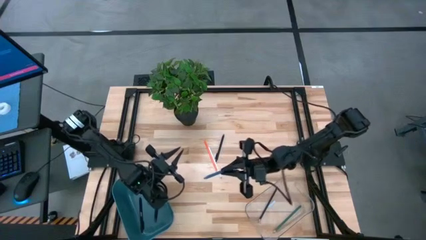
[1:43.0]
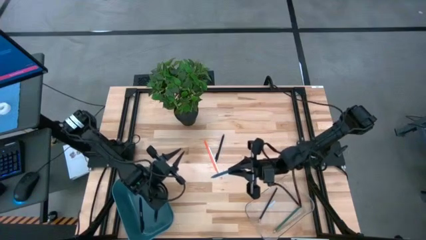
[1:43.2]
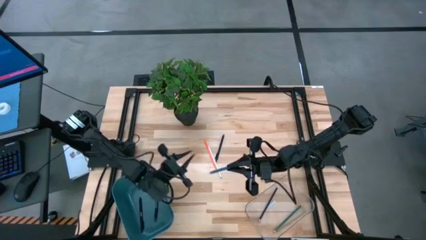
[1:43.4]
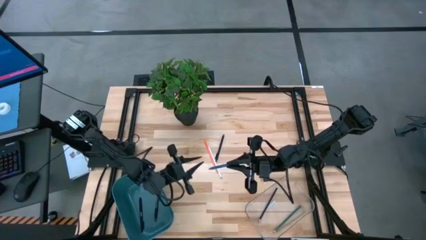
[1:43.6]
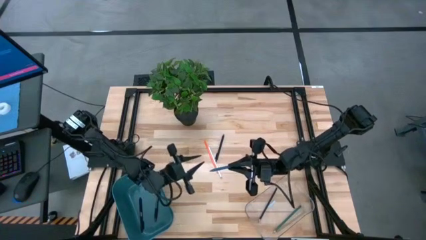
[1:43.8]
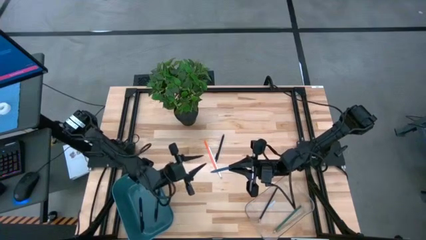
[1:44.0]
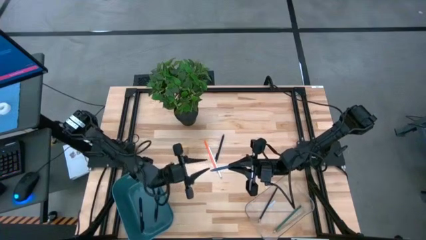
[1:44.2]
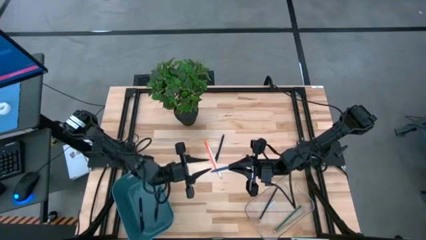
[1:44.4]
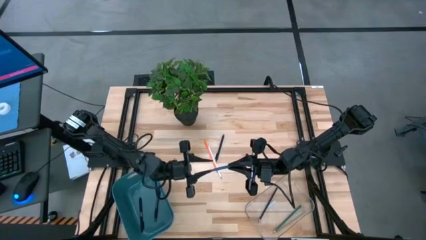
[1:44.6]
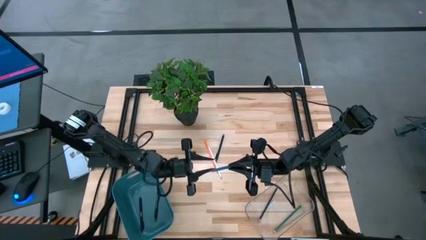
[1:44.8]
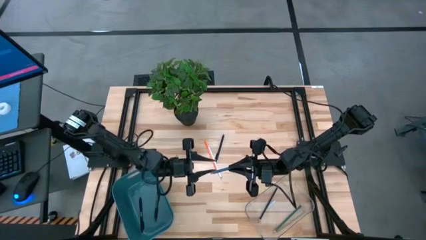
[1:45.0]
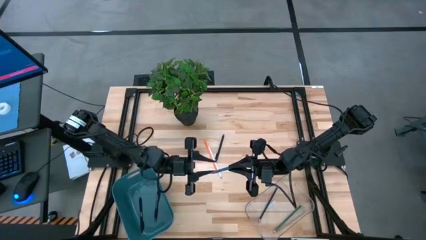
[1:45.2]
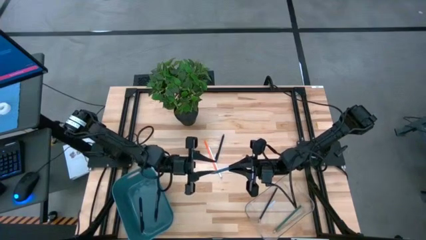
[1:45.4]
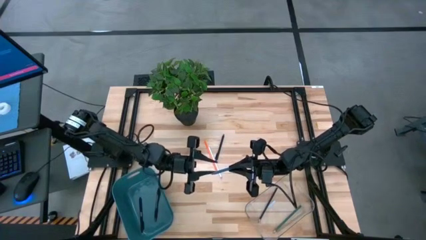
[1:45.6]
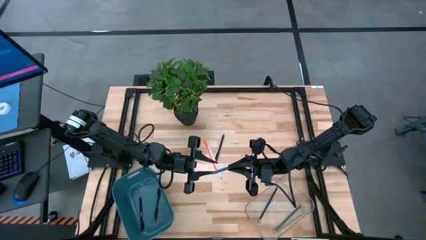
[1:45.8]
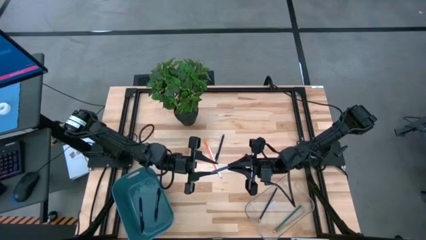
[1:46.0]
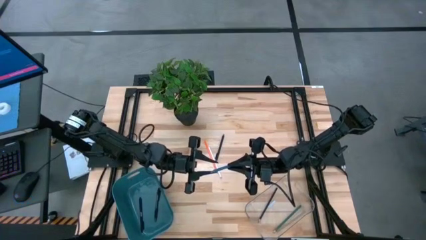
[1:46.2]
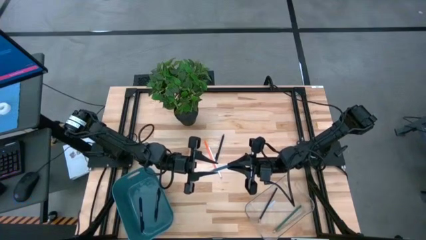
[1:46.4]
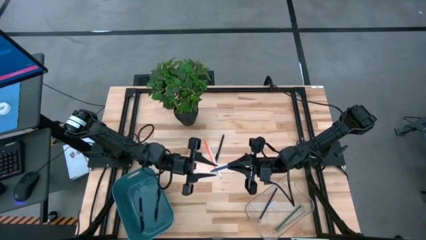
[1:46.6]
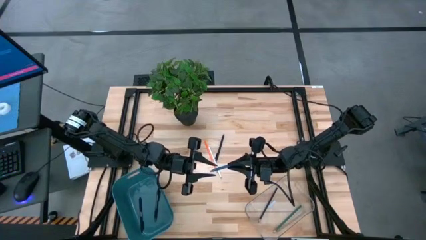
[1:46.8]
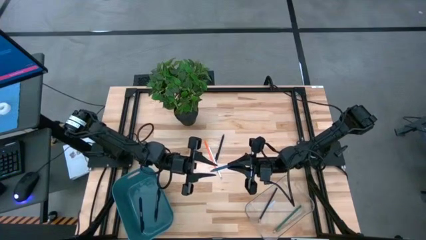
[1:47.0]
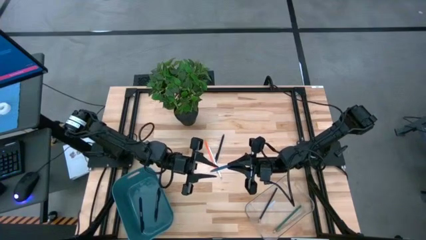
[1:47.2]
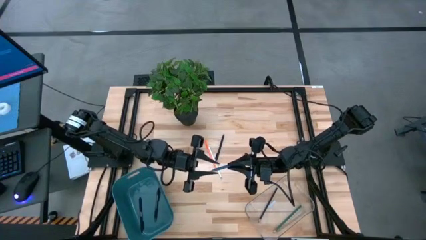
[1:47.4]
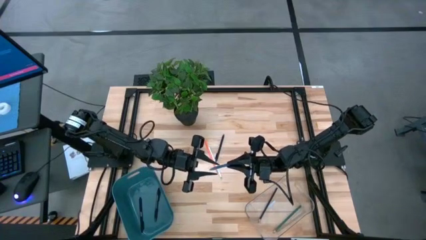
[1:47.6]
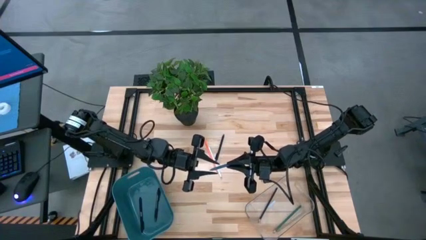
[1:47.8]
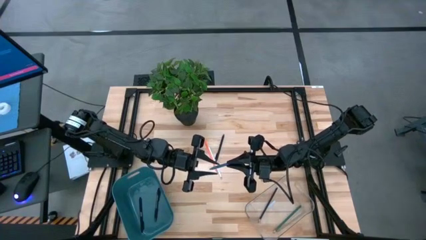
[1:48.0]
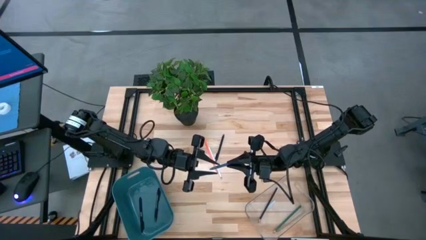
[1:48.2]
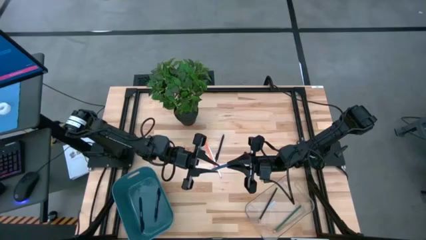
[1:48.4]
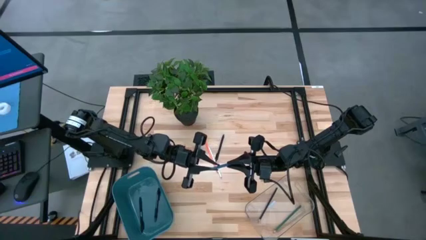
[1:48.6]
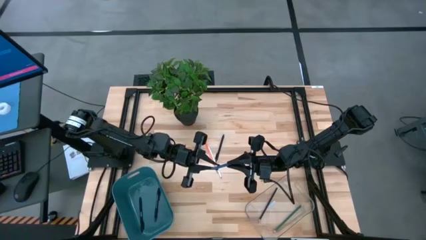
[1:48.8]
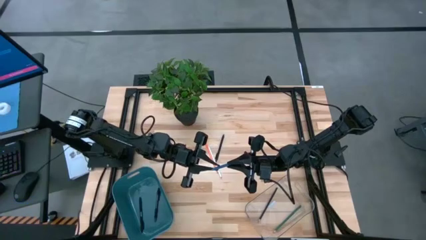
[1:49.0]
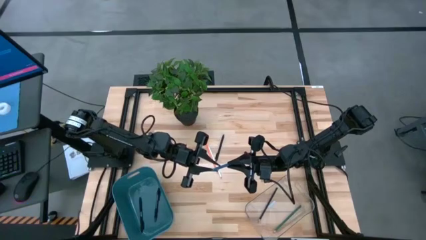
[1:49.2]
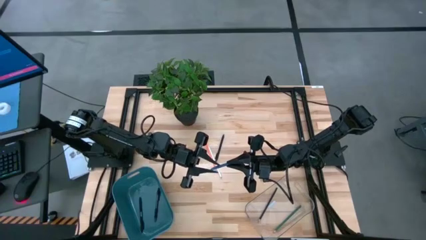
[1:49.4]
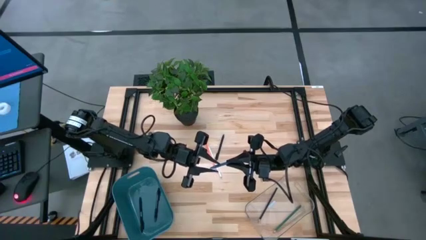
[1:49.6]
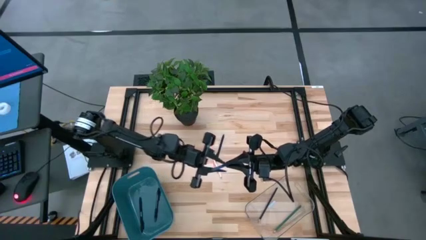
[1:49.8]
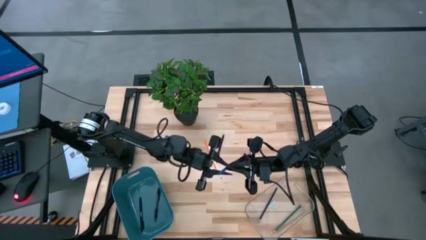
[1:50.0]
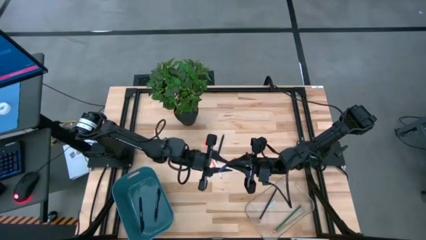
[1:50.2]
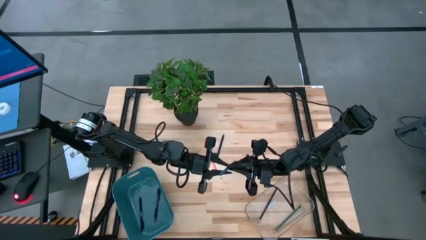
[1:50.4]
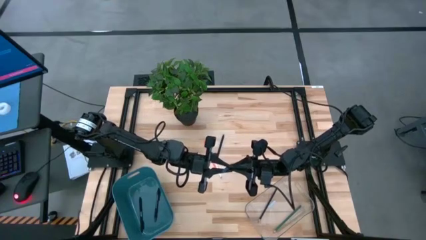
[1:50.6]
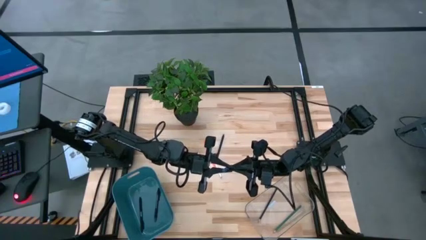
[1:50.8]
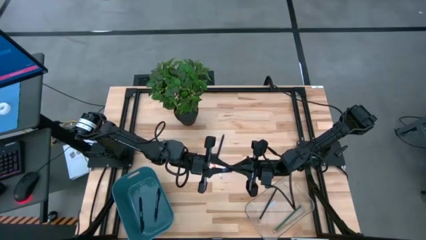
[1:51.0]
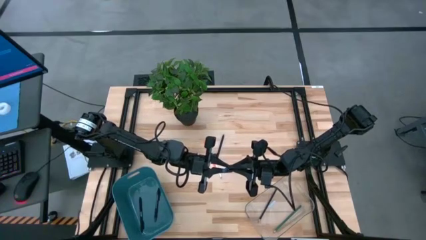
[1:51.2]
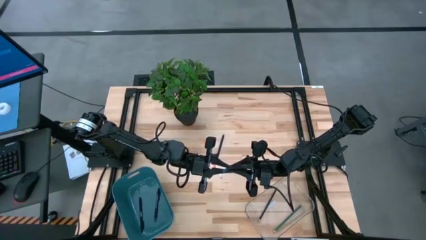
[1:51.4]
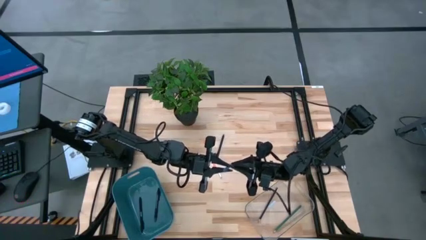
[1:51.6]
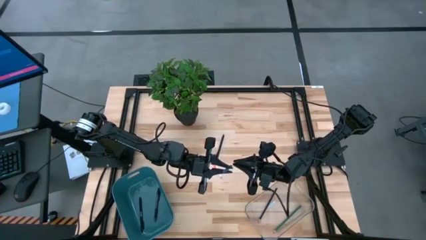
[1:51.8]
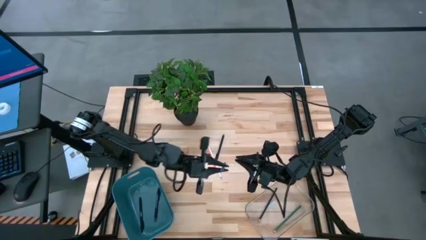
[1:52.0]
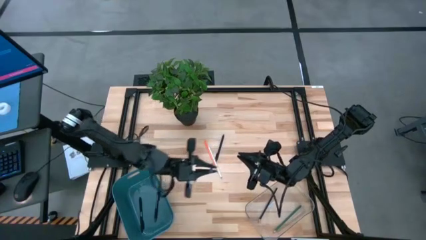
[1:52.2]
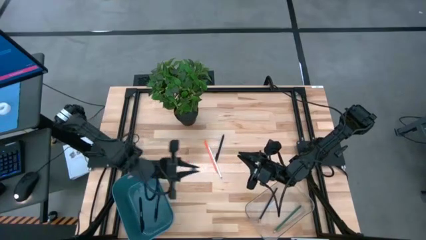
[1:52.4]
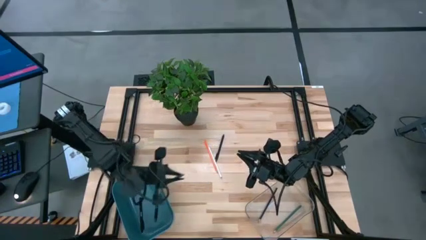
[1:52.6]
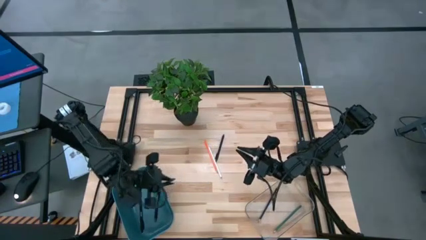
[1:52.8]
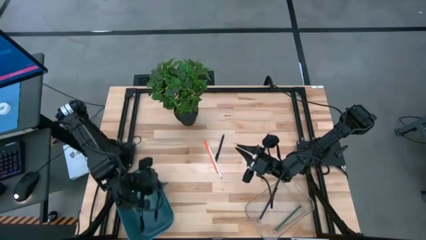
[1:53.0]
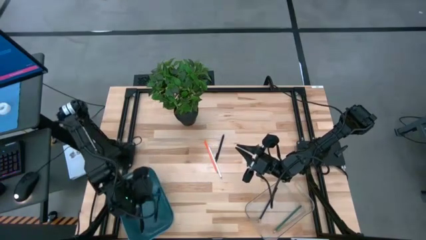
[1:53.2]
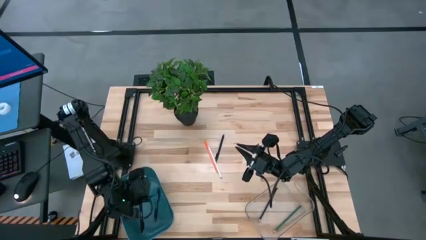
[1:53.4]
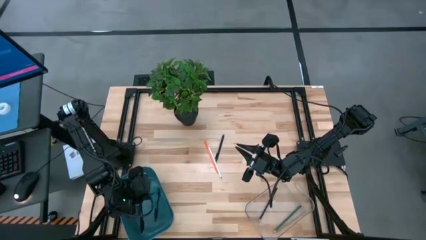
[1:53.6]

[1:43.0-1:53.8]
Task: Sort pens & pencils
Put the blue pen into the blue bin

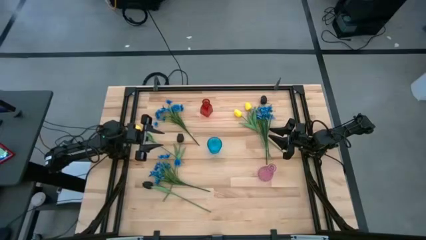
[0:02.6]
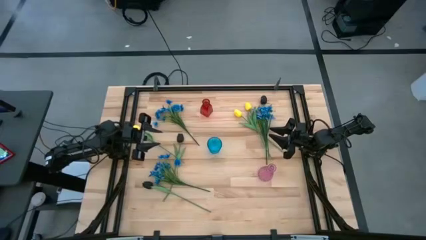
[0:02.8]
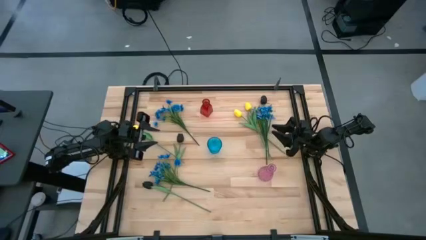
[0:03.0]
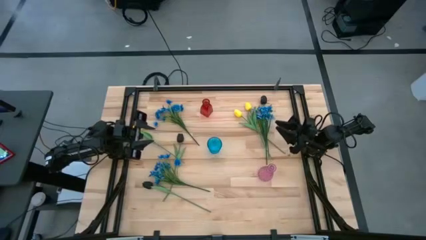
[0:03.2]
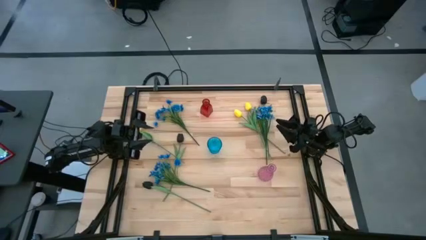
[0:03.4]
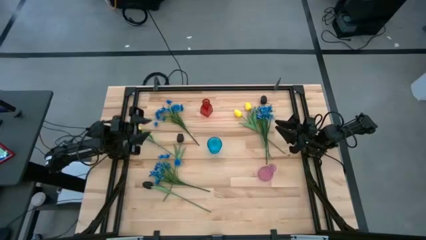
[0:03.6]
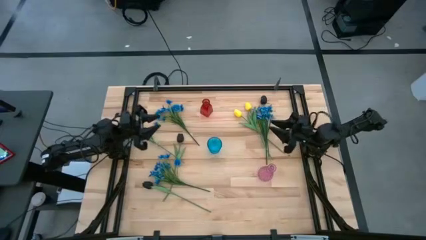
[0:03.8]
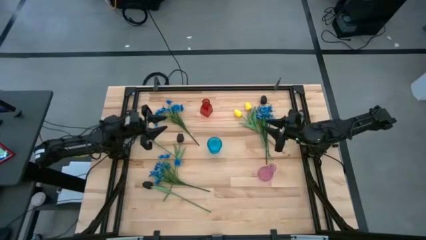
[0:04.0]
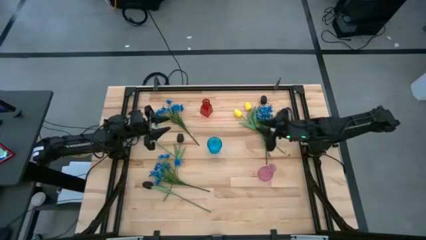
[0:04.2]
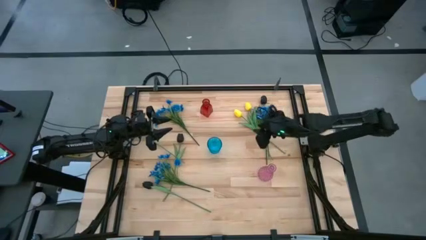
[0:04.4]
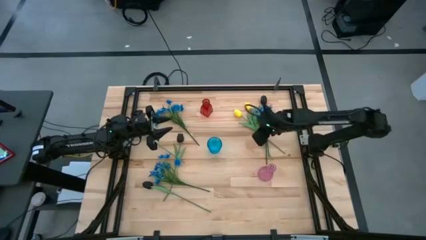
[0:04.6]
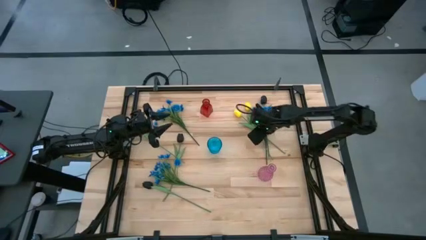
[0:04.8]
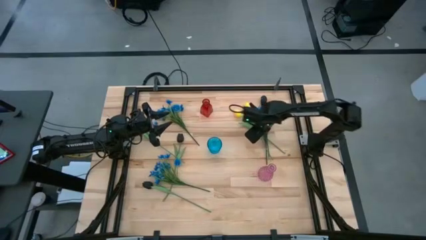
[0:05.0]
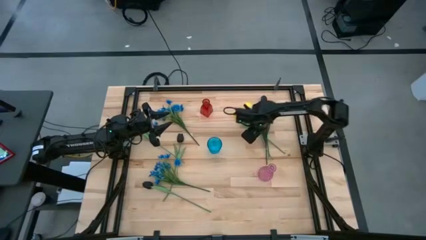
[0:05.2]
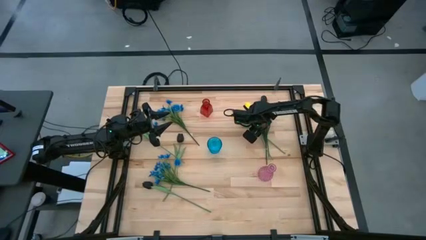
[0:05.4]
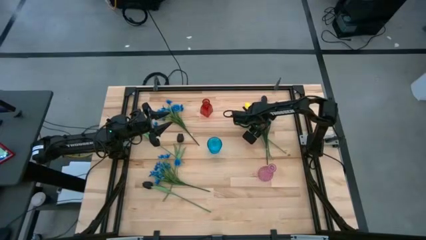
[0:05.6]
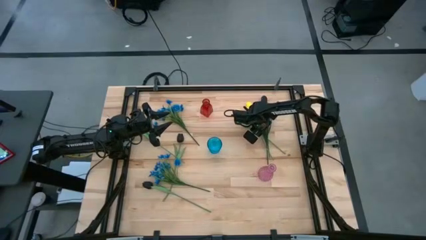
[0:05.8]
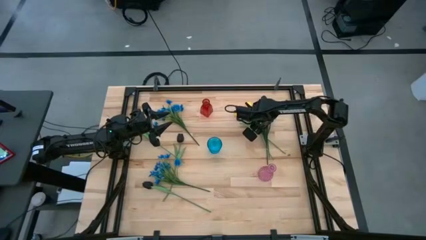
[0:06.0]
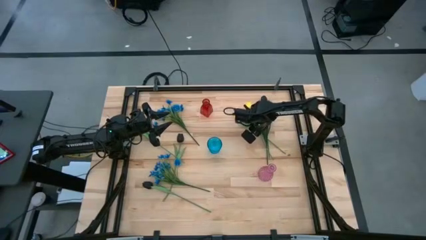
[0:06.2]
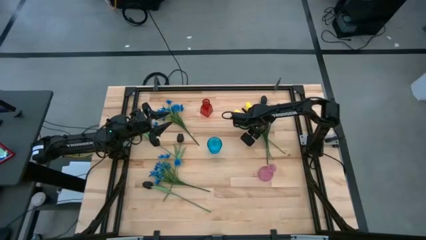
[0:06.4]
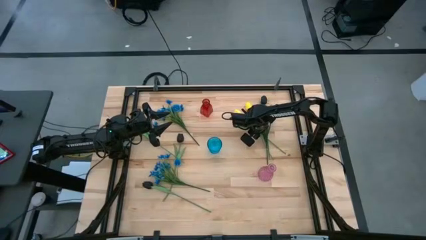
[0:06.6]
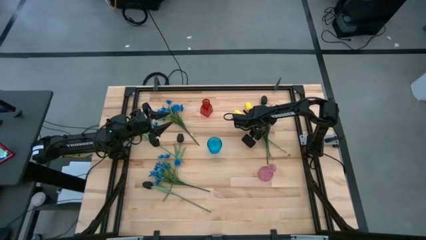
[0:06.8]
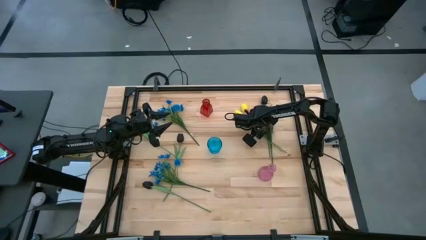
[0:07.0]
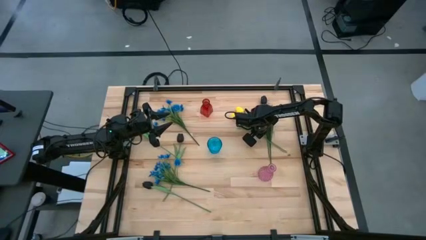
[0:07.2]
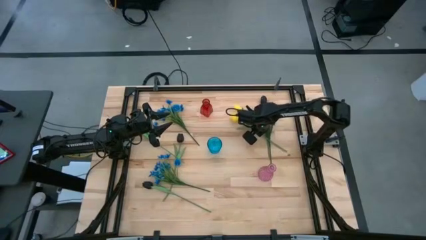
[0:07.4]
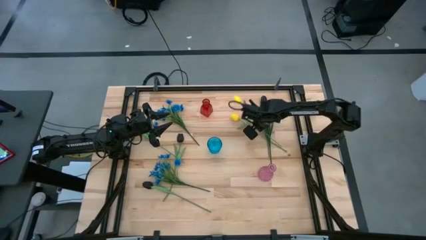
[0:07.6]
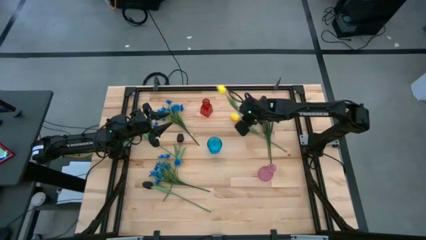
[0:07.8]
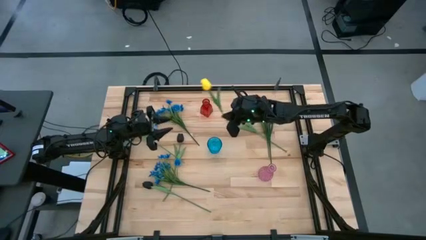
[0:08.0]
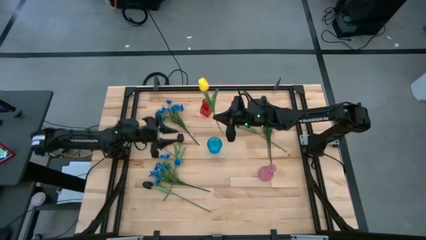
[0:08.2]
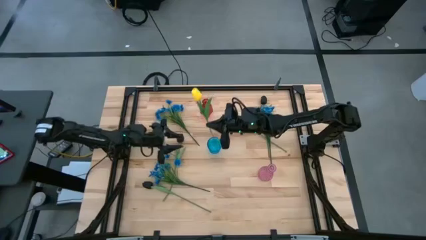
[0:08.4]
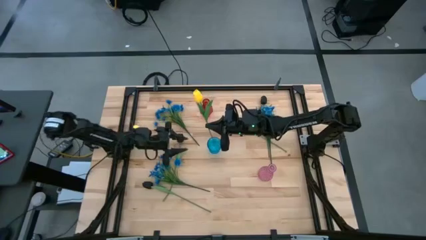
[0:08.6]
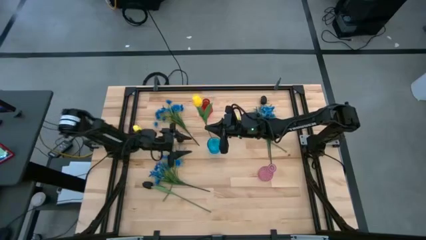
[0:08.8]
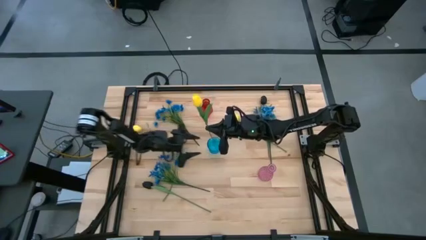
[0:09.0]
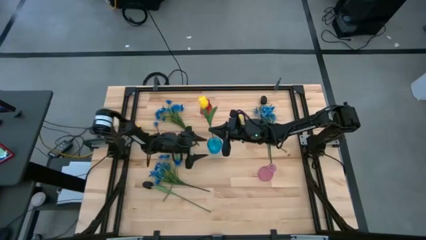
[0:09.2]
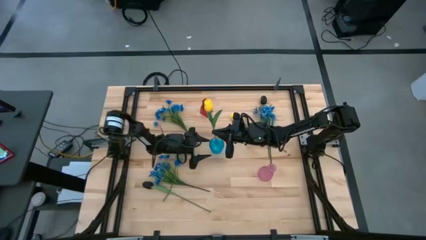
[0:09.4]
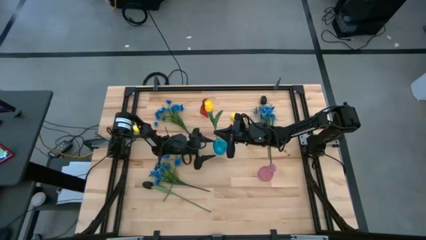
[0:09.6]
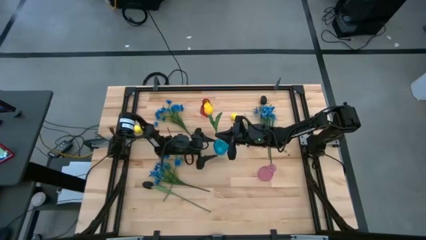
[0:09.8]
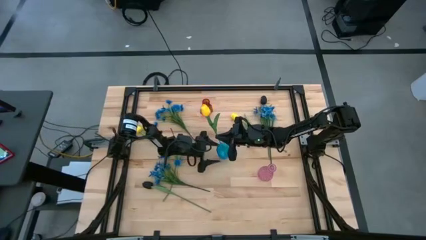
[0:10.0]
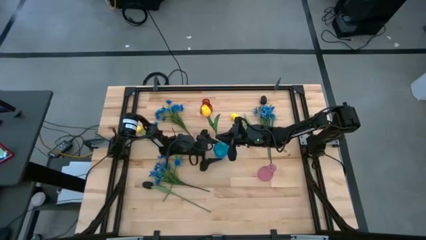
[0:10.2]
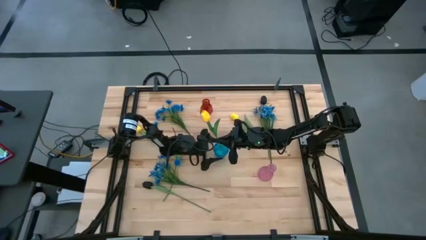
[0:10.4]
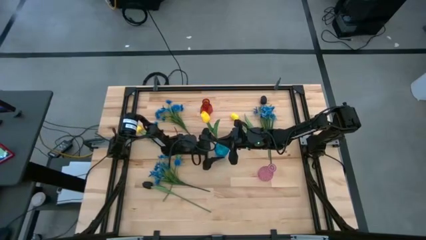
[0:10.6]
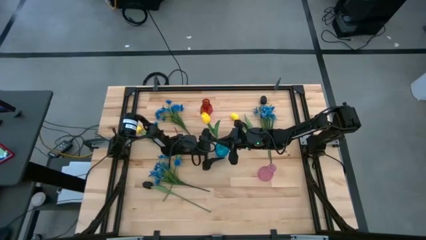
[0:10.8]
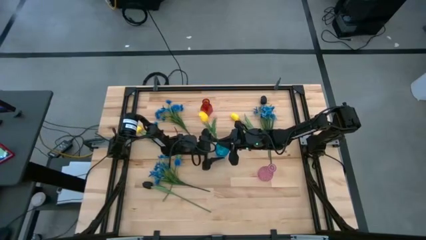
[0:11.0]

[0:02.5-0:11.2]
Task: Sort flowers into vase by color
Put the yellow flower into the blue vase
